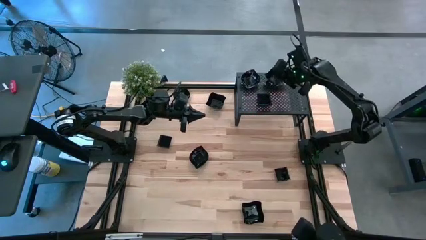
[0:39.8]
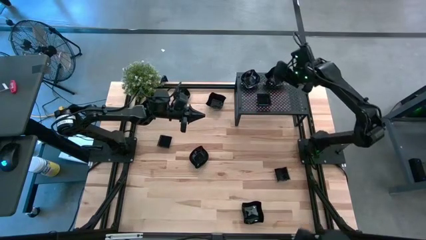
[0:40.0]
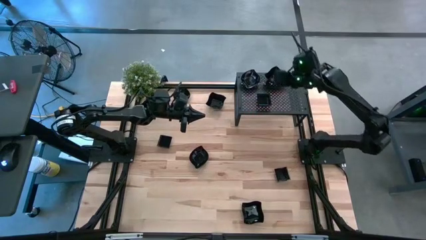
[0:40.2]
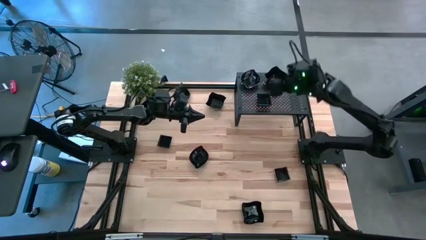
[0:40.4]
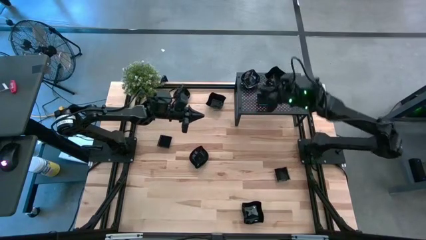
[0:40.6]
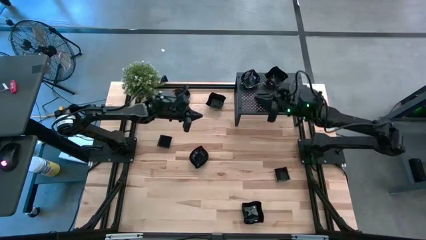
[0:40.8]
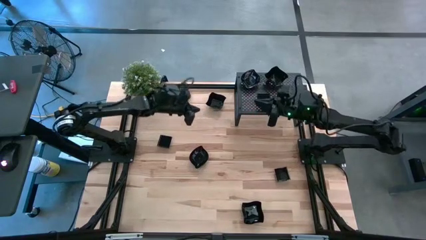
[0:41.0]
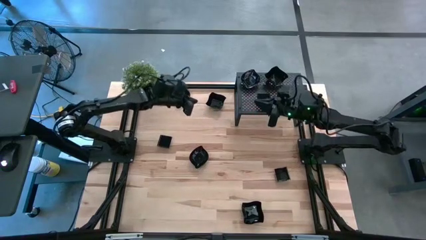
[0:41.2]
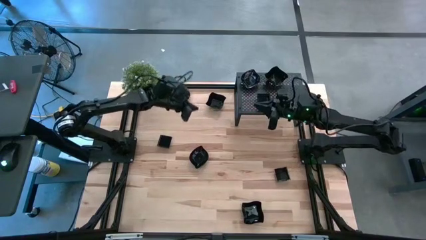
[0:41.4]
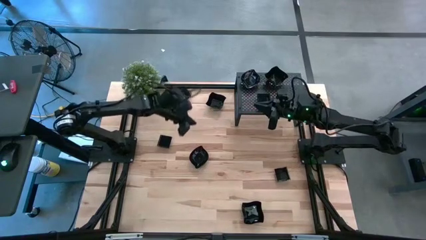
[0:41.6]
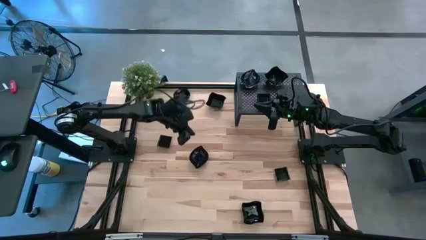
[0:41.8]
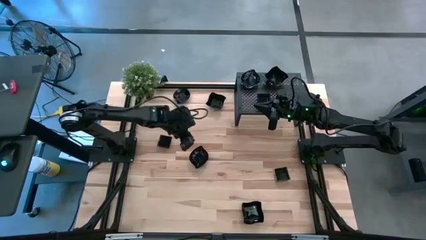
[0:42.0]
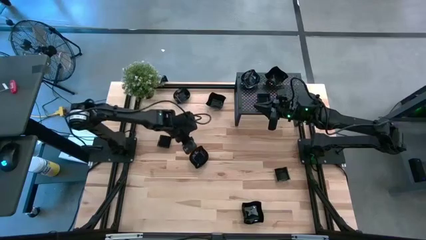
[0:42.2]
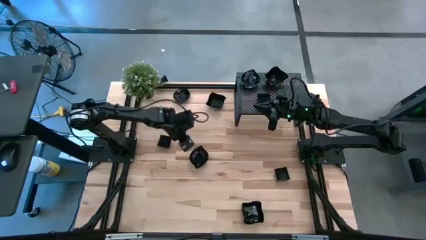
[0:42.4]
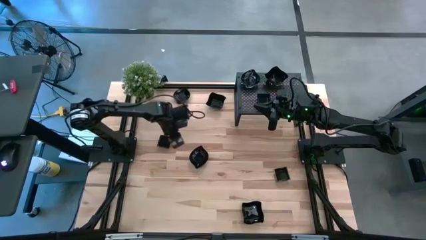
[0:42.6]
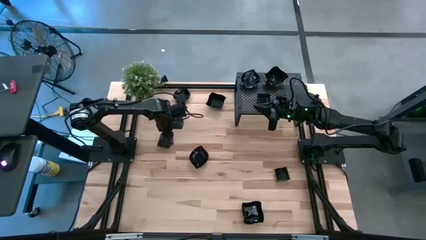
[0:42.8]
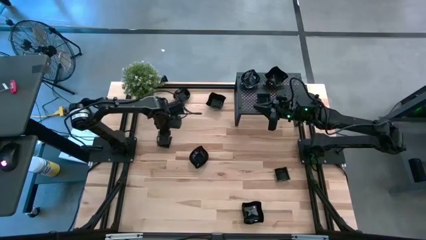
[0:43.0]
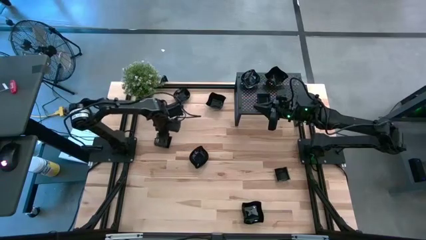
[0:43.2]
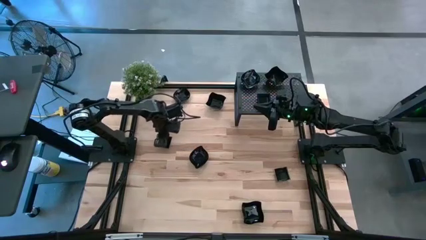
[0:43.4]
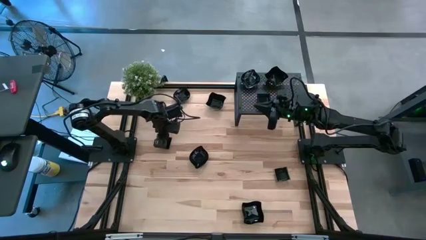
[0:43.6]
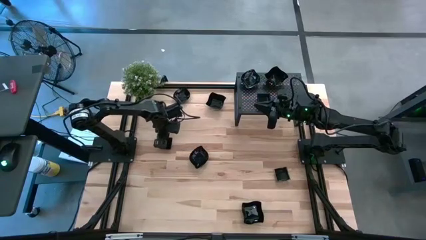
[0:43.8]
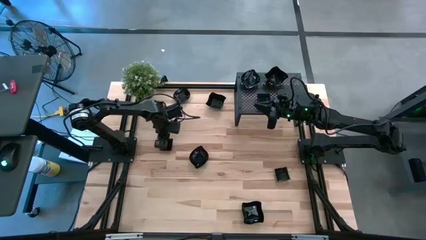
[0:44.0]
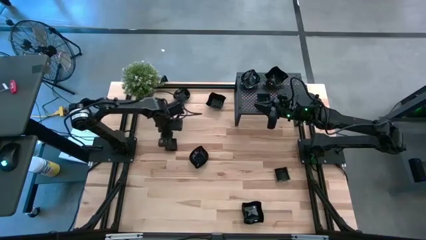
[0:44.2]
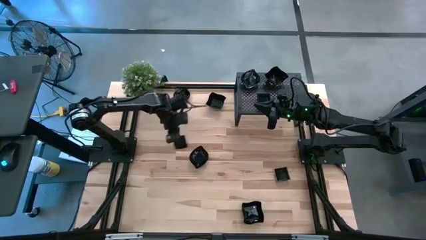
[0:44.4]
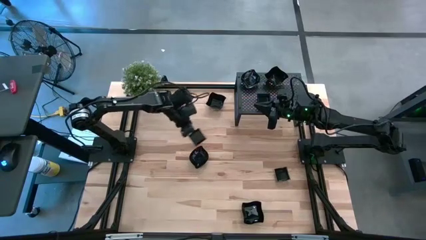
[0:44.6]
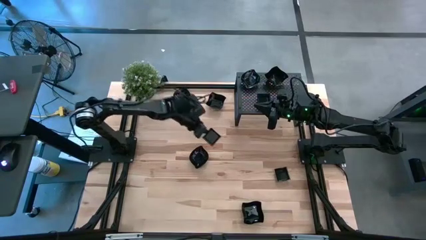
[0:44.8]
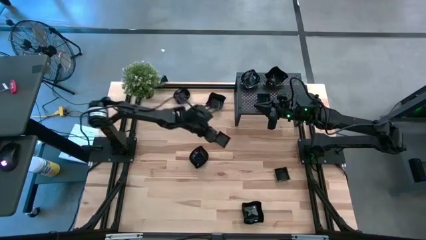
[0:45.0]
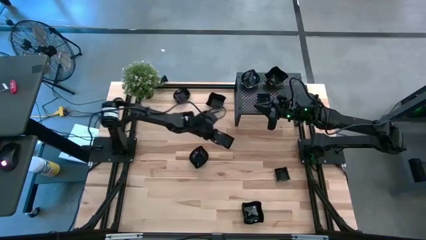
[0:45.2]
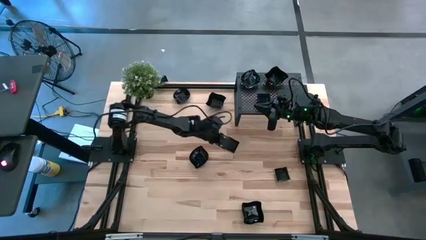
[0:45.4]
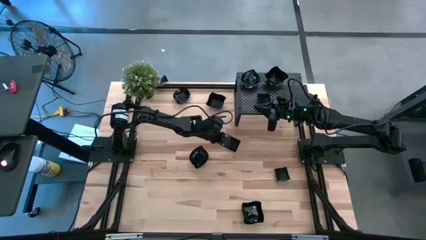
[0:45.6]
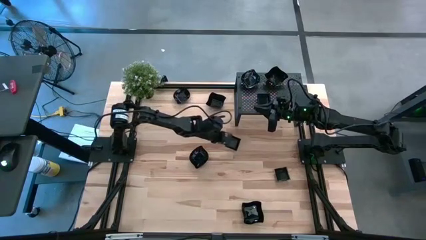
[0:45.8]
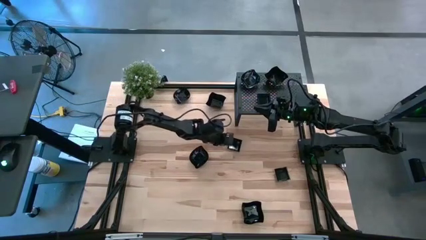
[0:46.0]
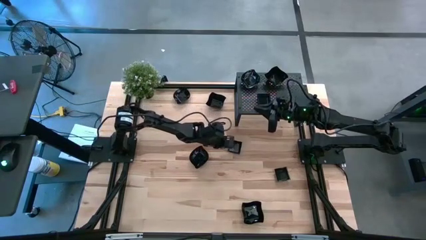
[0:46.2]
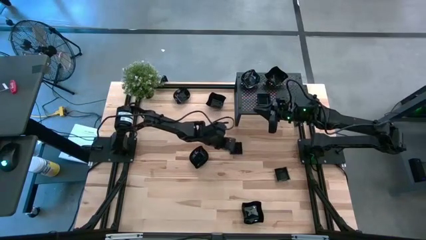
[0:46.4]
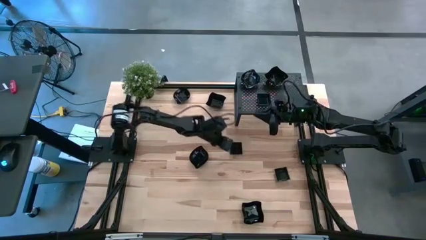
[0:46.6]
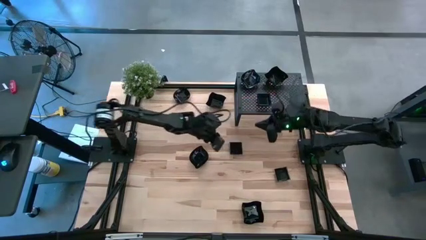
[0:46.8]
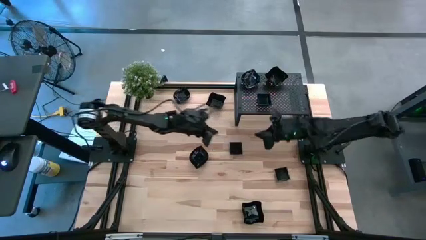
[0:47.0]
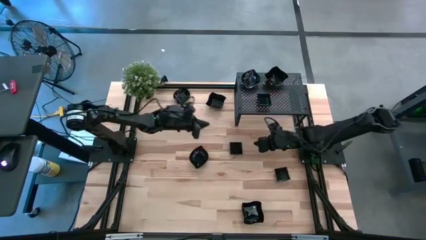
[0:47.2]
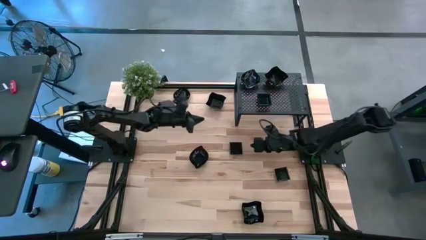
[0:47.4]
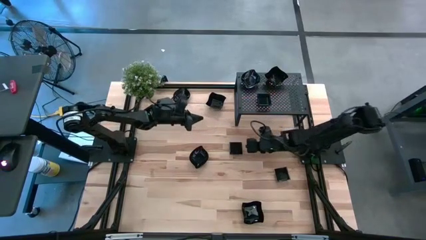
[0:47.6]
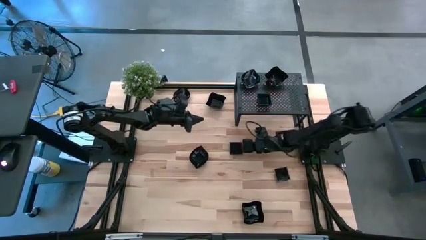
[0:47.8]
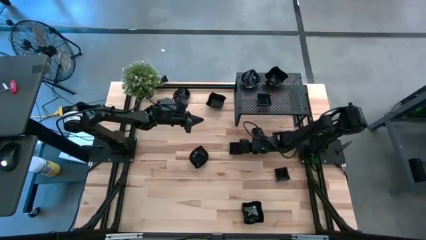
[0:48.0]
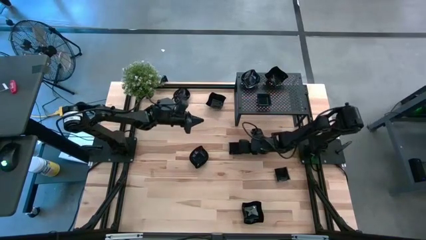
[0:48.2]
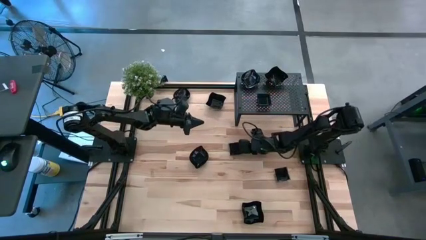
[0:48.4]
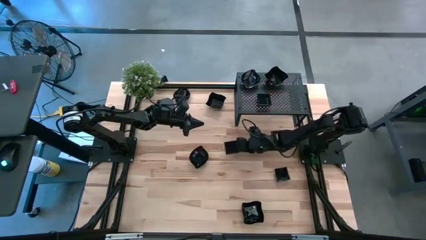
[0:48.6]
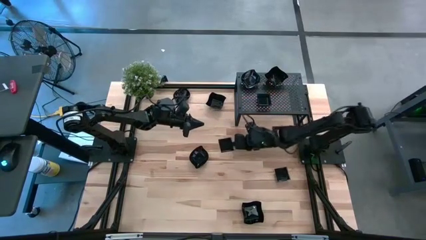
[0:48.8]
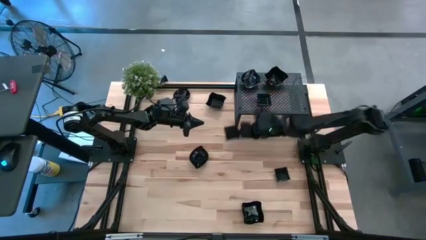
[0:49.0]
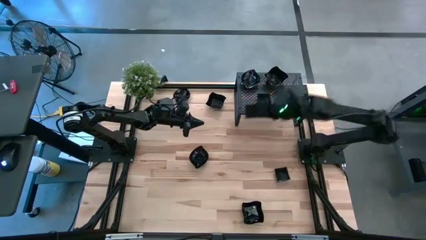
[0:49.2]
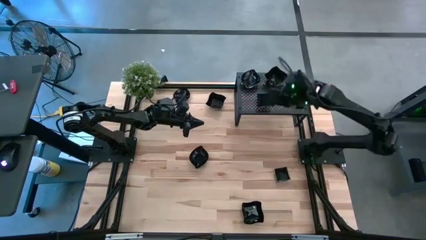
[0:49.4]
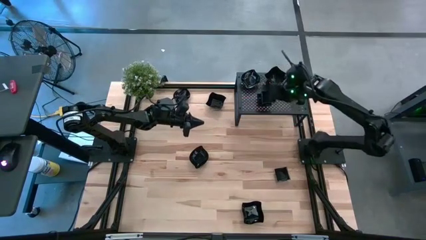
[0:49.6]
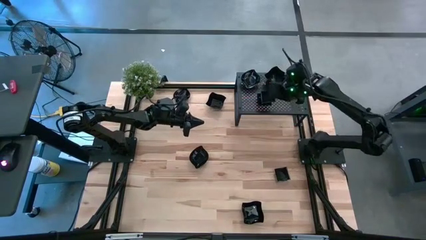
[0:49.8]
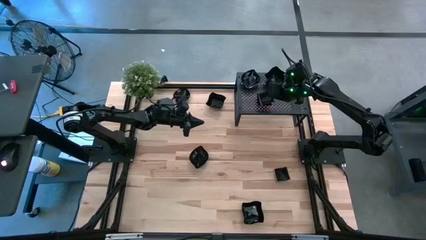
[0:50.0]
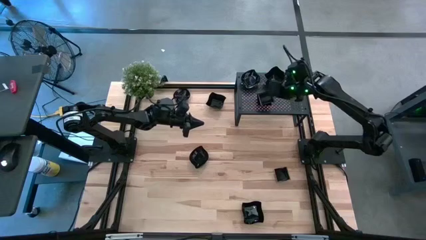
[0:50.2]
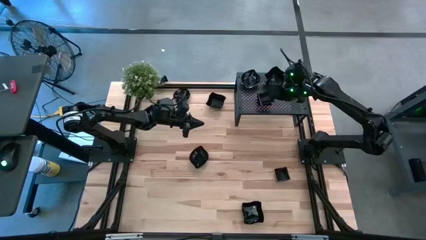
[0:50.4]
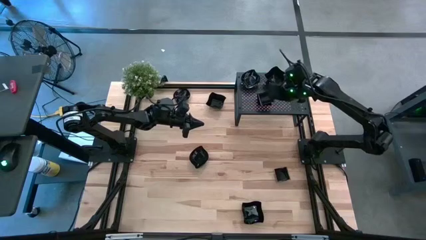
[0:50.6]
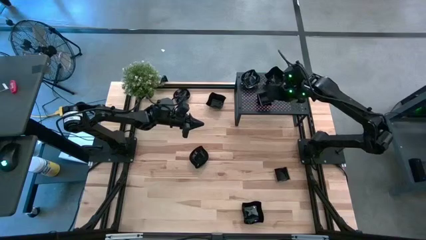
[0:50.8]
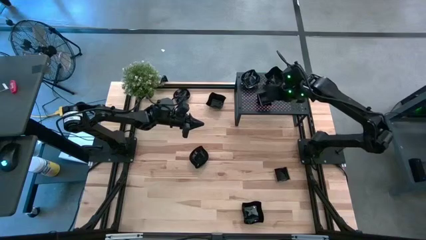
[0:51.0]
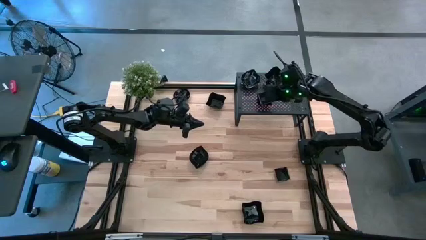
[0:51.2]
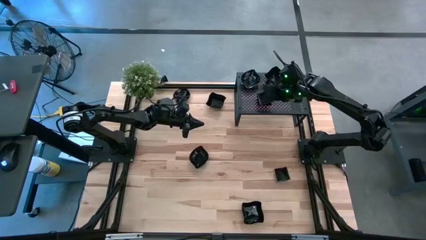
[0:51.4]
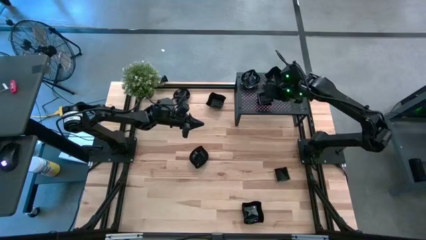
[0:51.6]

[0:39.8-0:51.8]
Task: Pick & Place Mini shaped plates
Stack the black square plate on top of the black square plate on the shelf

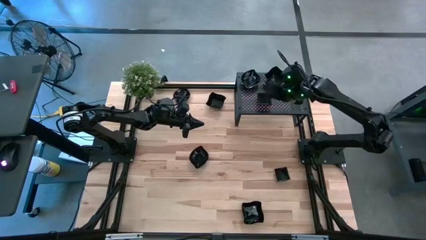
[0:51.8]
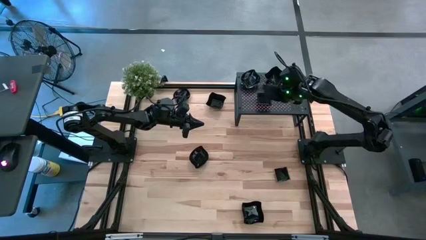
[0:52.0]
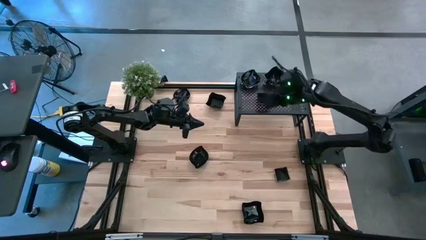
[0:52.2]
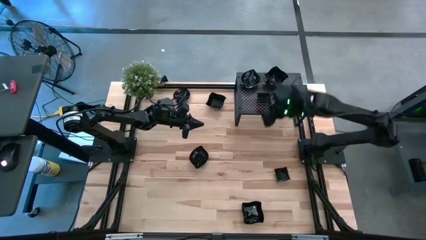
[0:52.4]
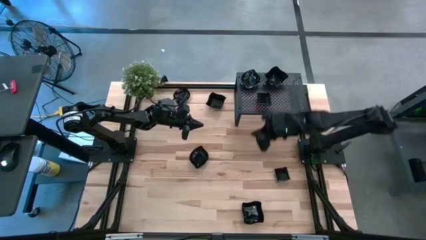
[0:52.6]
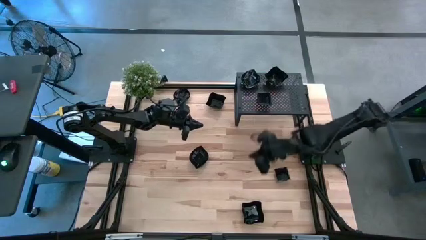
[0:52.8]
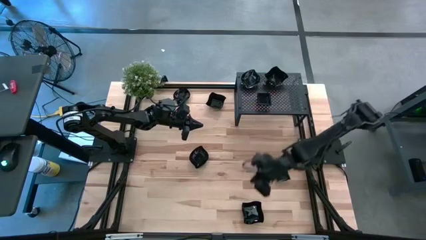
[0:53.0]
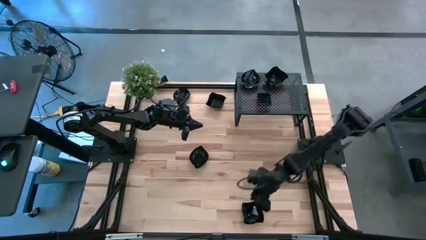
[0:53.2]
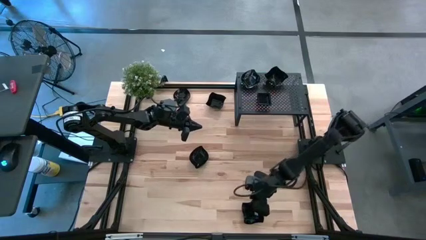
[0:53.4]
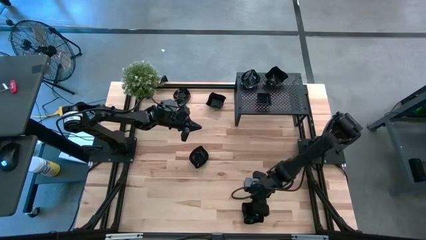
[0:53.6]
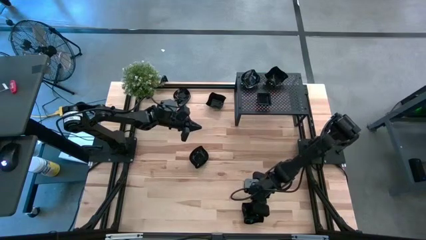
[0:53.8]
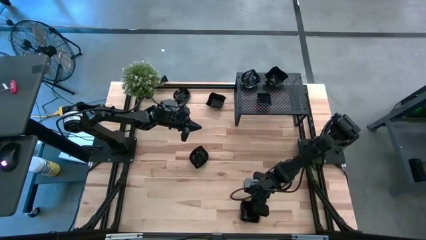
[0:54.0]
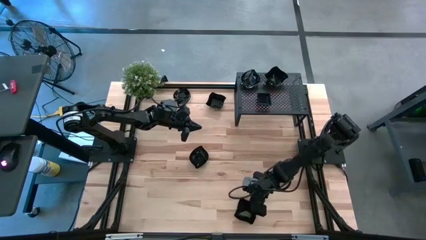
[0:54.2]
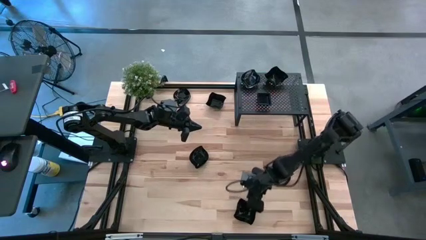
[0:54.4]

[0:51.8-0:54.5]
Stack the black distorted square plate on top of the black distorted square plate on the shelf

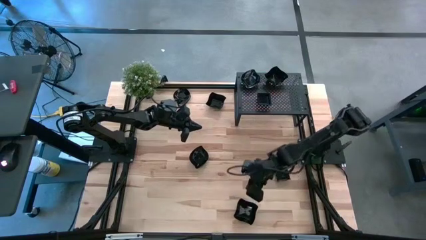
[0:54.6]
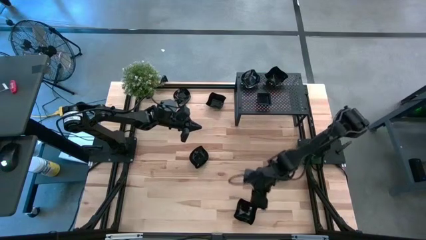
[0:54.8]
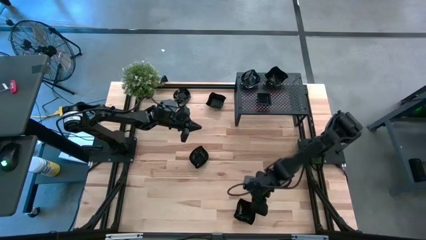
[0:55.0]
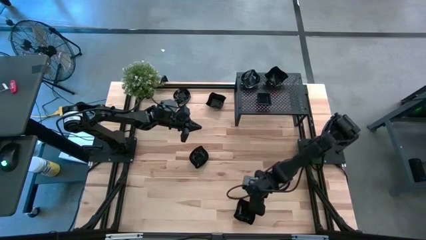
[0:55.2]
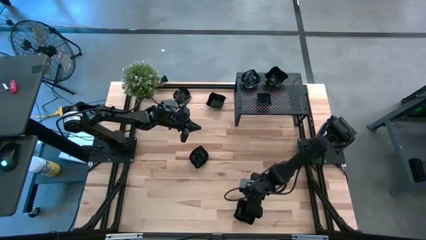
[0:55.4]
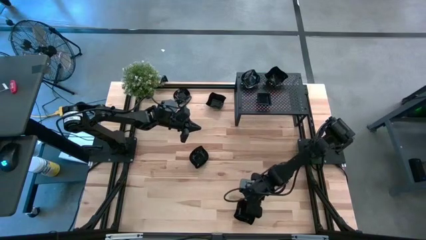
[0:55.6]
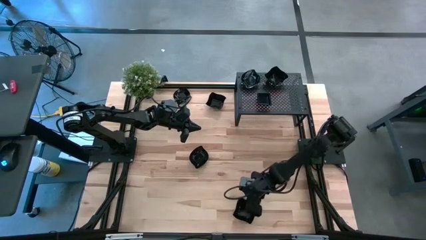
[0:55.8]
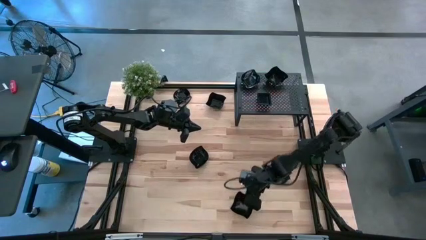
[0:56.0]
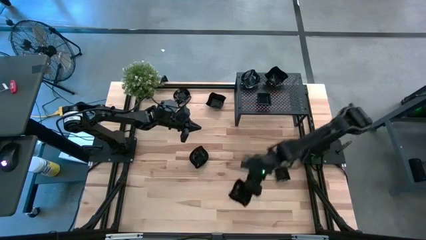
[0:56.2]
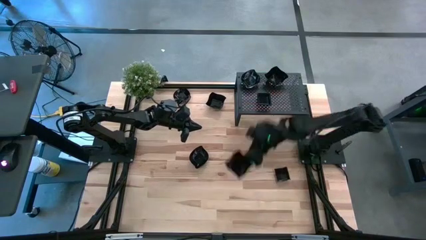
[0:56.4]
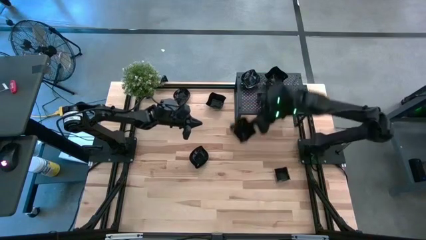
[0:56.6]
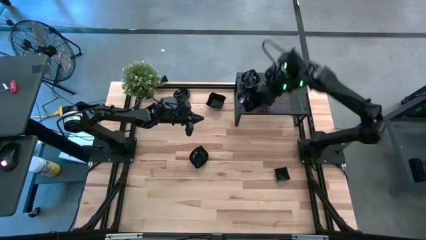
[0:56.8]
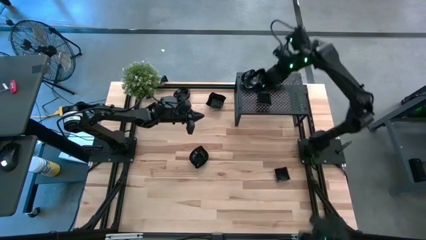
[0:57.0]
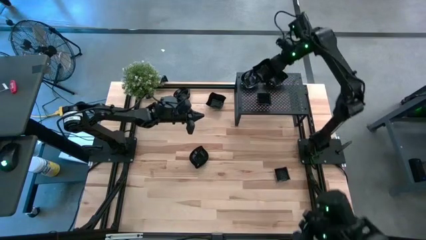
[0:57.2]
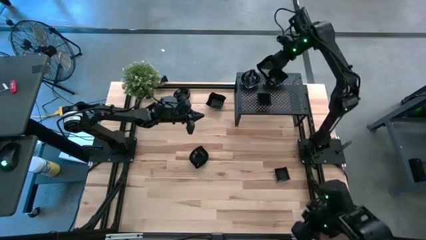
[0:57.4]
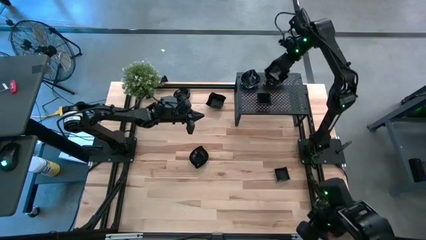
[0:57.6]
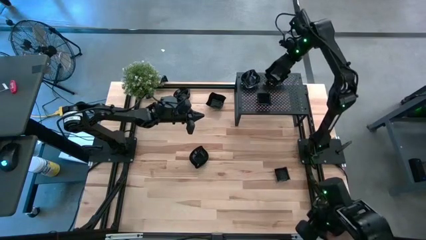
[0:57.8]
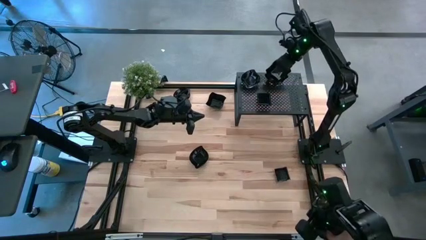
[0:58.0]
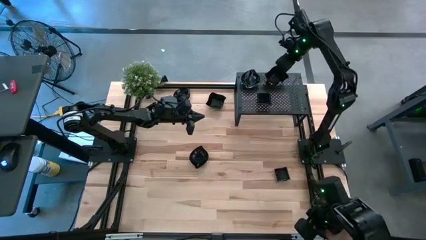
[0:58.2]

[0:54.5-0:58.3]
Stack the black distorted square plate on top of the black distorted square plate on the shelf
